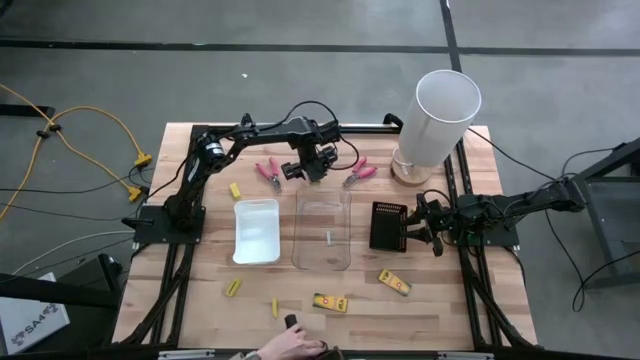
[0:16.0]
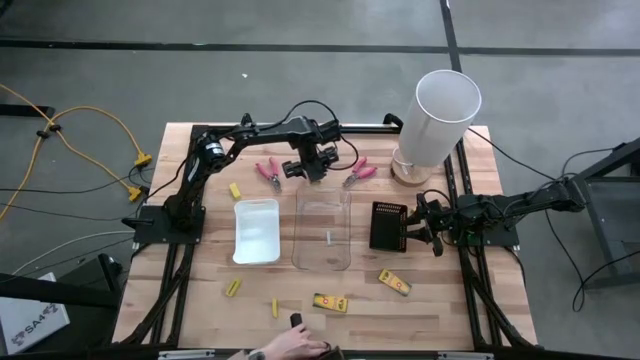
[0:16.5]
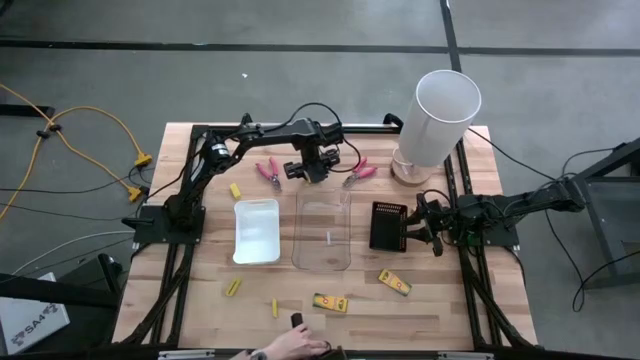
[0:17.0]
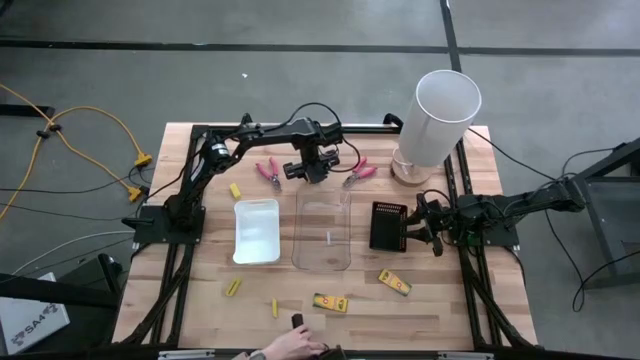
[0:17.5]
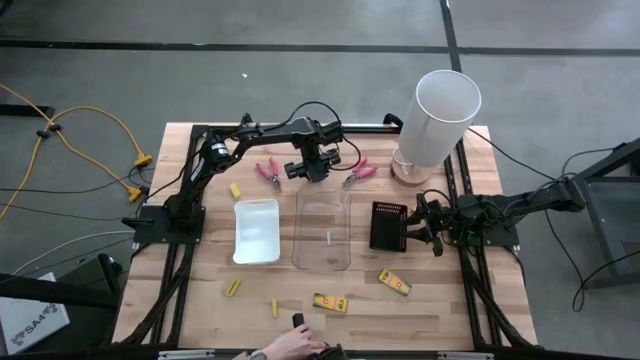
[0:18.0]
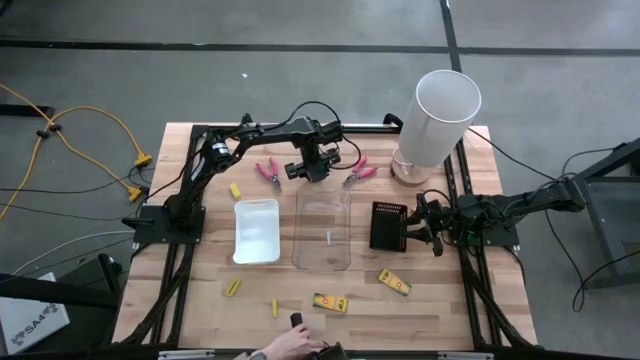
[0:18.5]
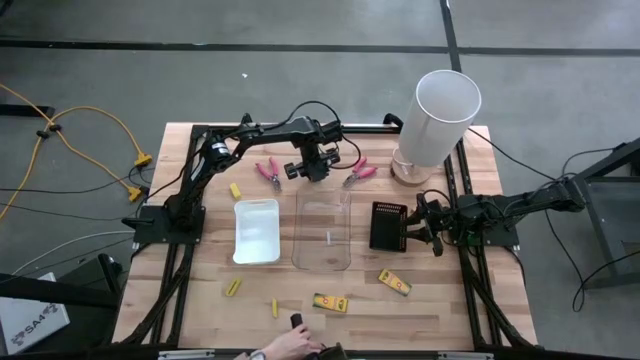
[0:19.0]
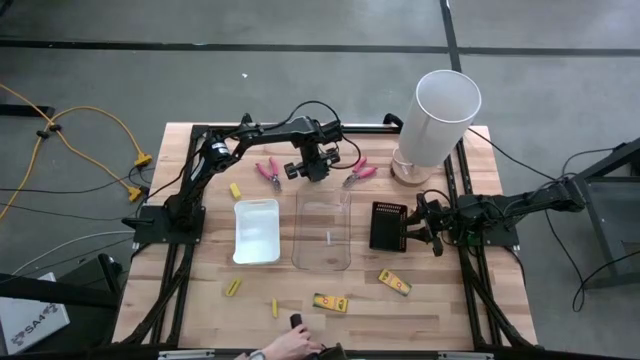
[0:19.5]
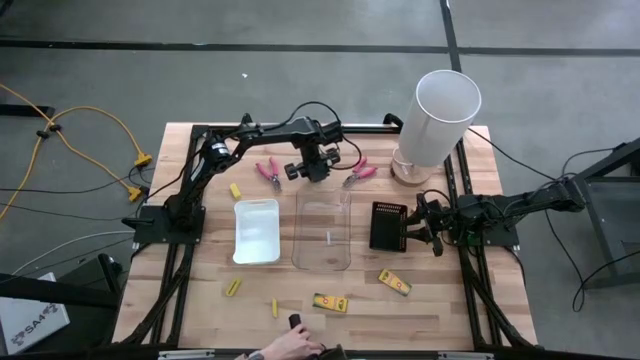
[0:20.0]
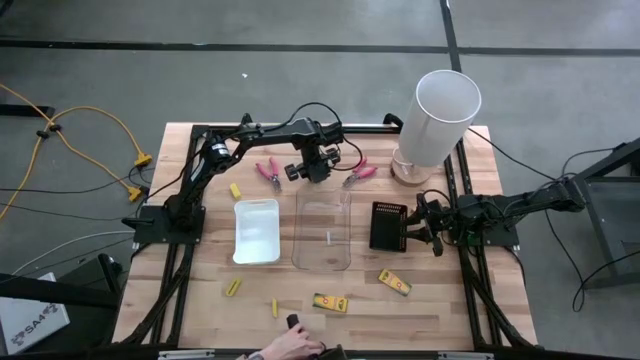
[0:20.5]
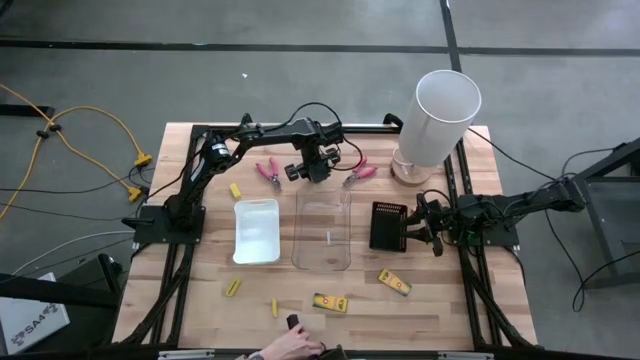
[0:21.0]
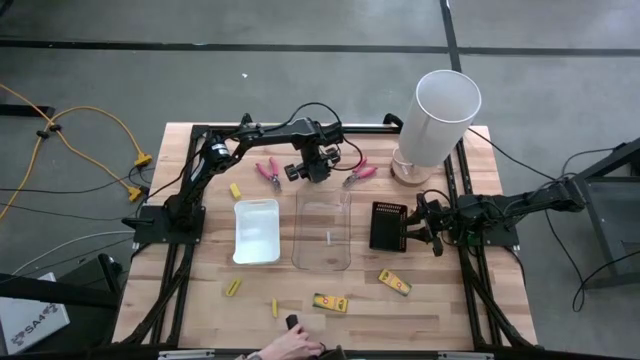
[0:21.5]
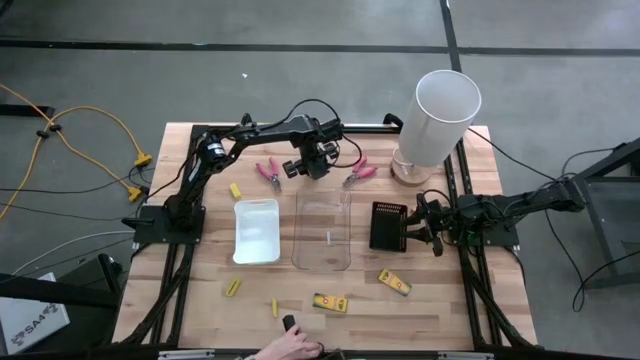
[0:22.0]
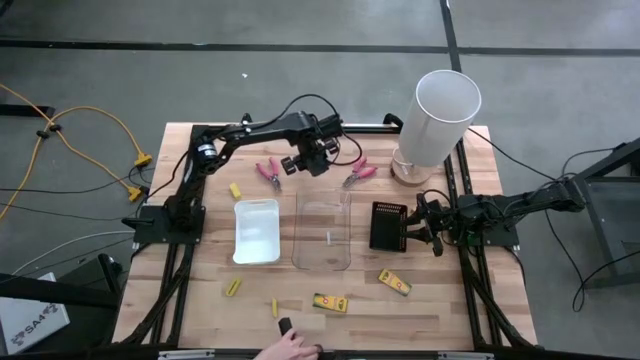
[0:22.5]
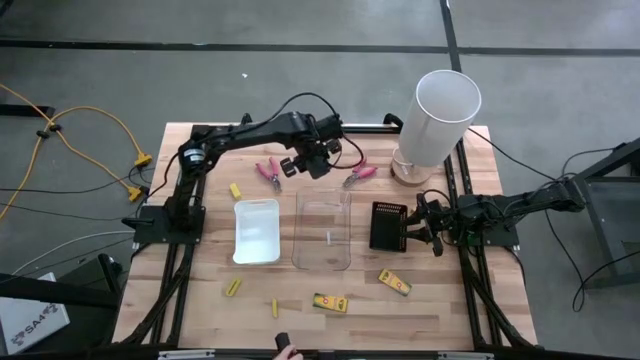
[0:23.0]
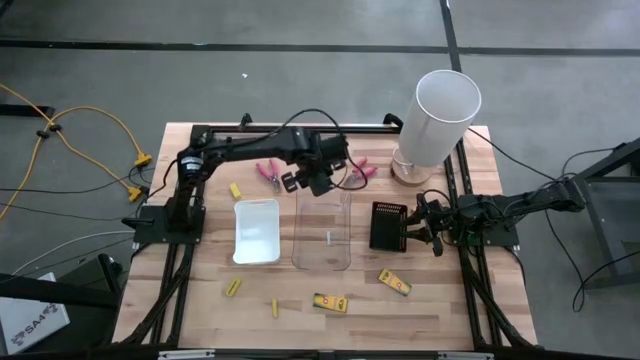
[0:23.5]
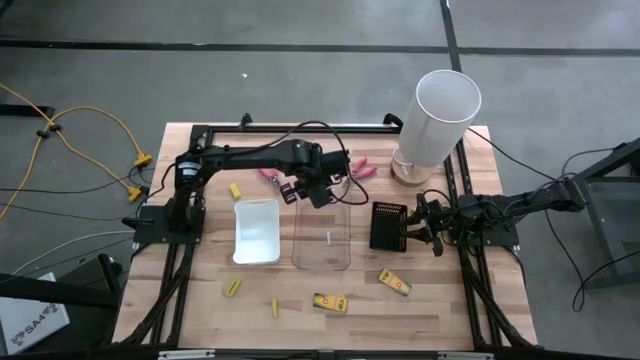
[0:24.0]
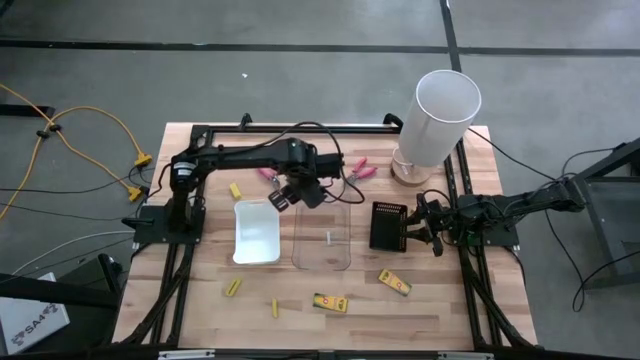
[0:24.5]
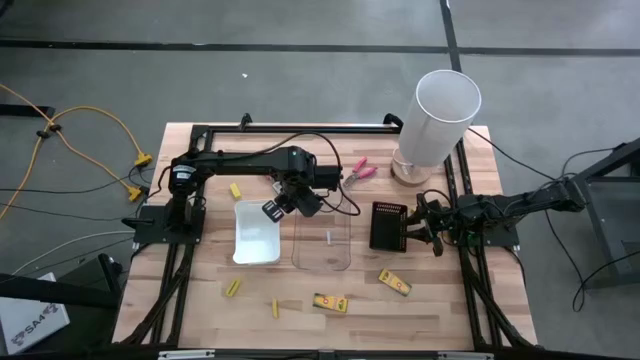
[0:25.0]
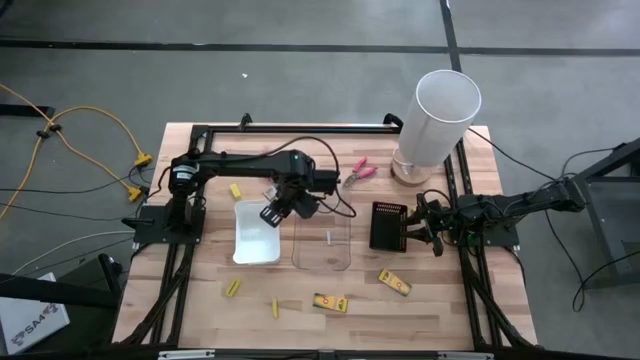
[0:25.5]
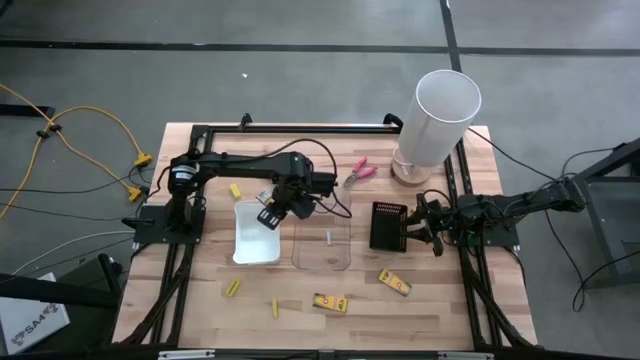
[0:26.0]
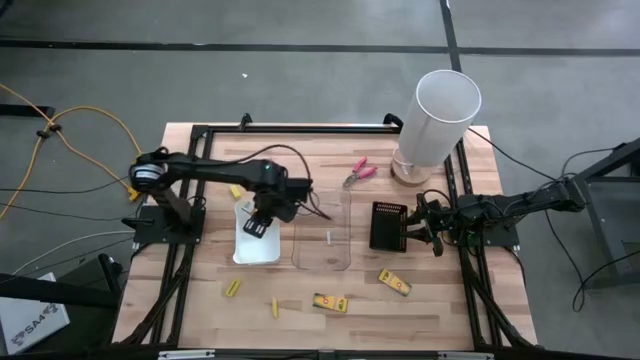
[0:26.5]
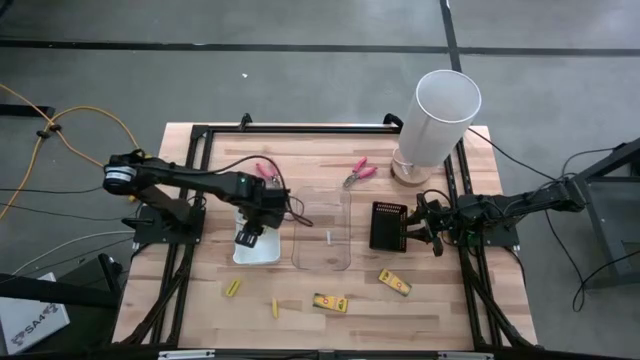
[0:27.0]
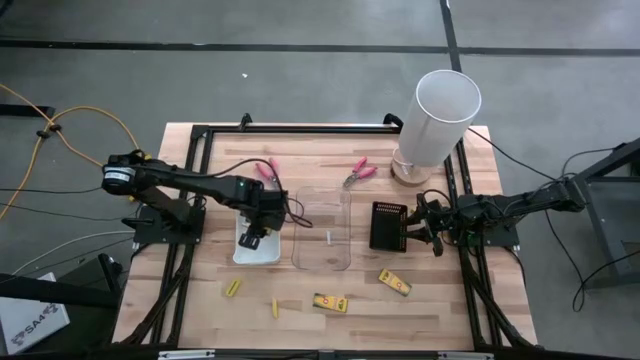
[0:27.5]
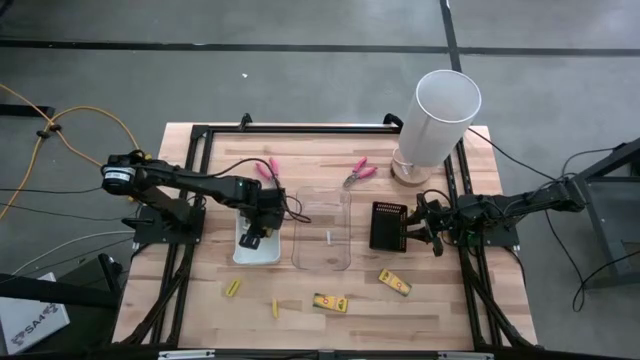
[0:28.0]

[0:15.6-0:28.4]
Task: Pick & Place School Supplies
Put the crayon box into the white bin

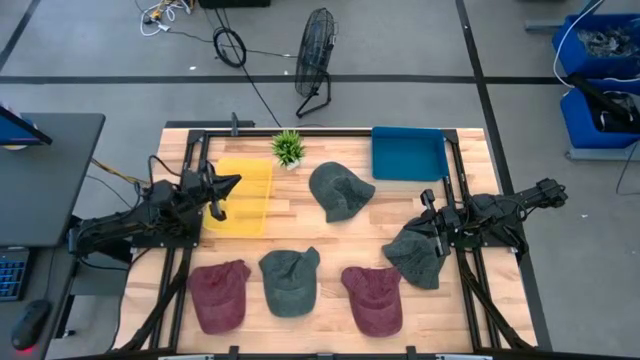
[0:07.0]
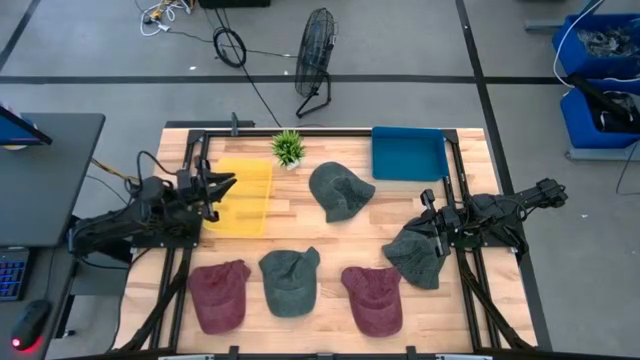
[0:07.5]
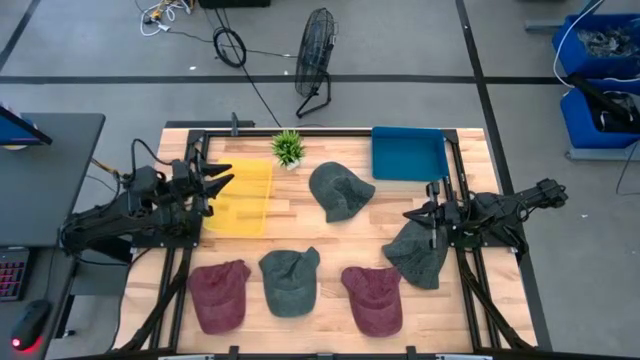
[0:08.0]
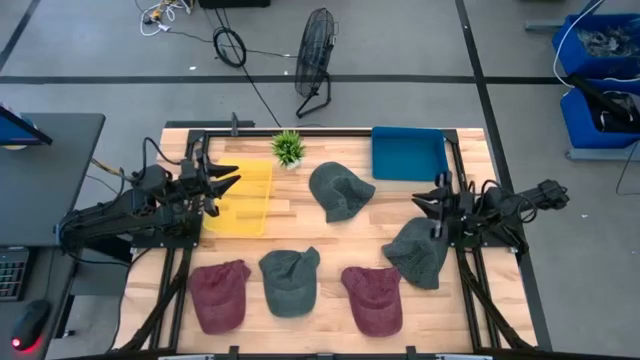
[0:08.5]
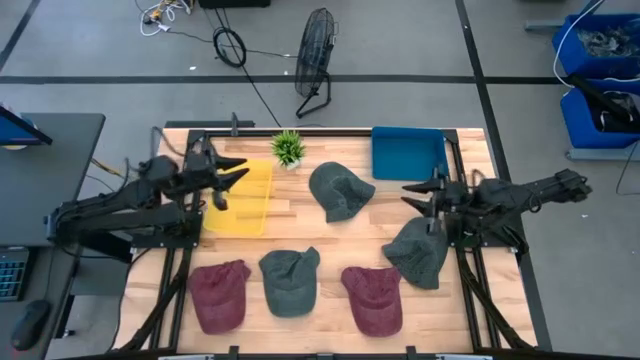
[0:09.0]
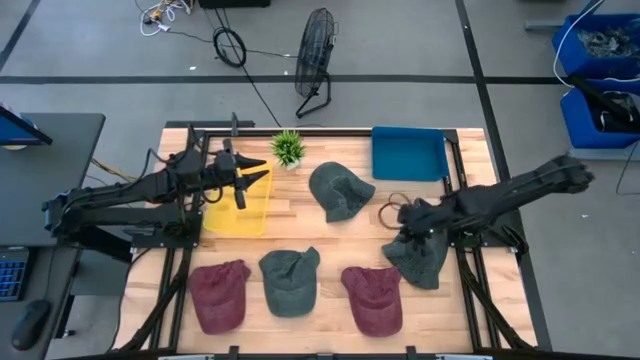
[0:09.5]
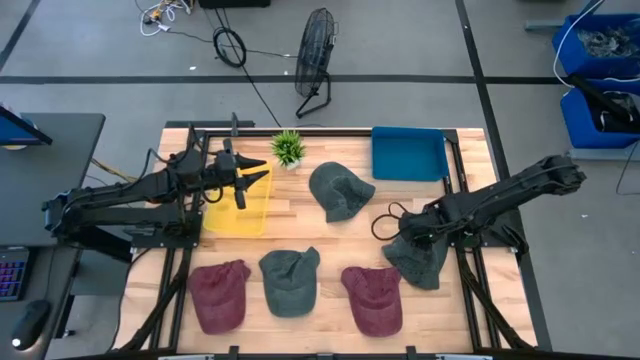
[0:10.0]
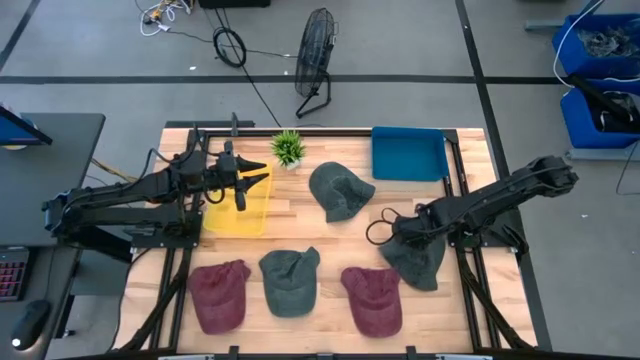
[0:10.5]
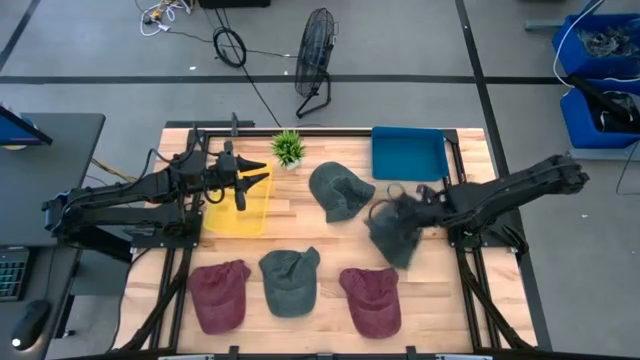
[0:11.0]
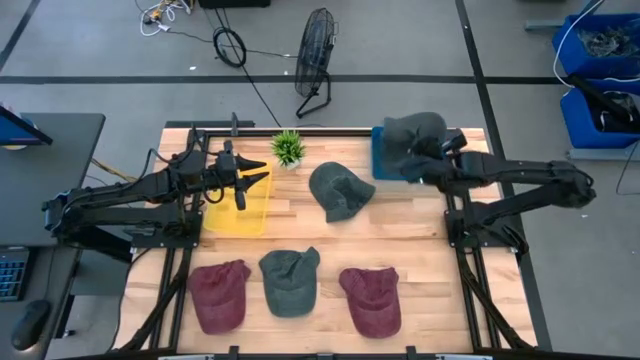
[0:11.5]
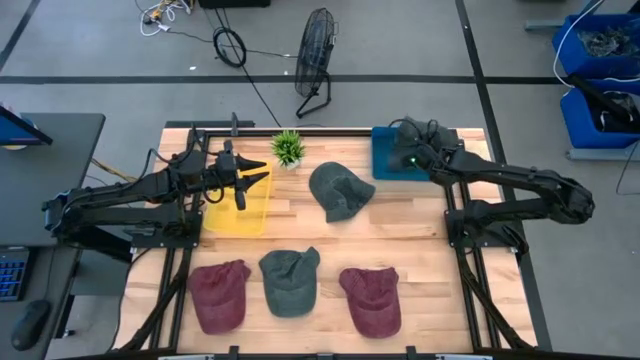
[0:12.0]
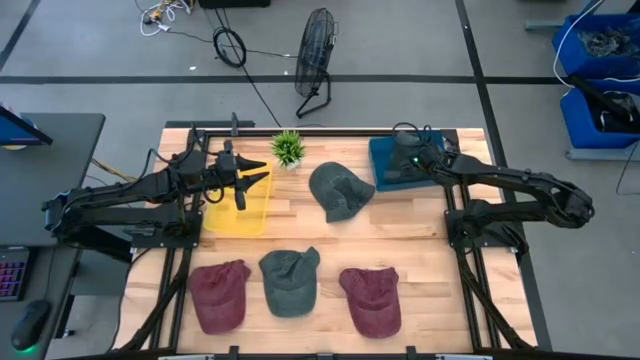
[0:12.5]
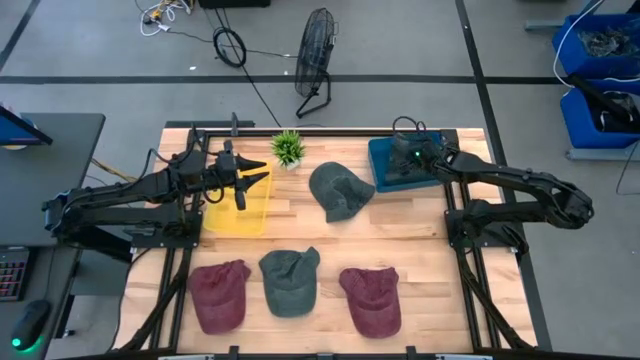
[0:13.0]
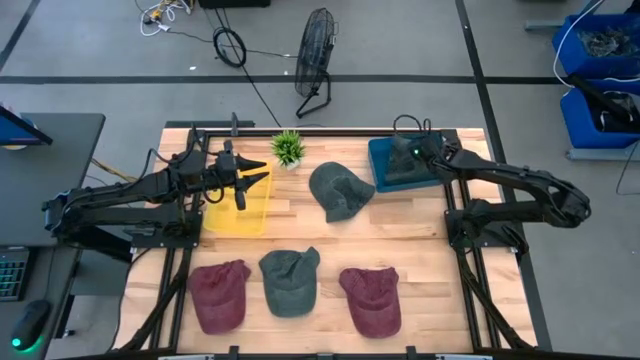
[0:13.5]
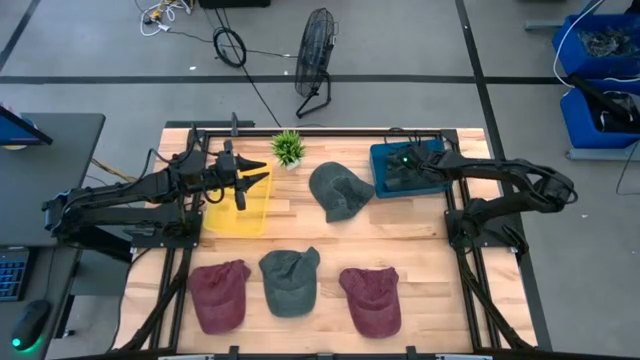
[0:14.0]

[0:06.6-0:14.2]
Task: Pick & Place hat
Put the bottom right gray cap into the blue bin
